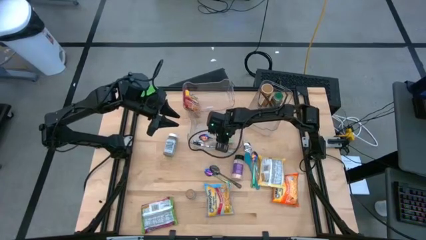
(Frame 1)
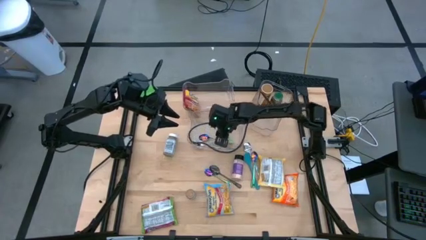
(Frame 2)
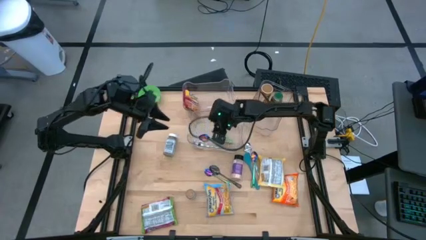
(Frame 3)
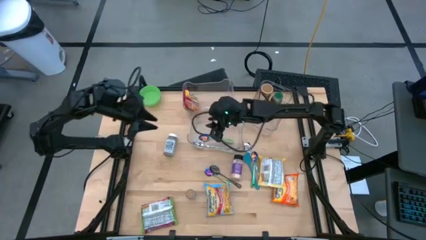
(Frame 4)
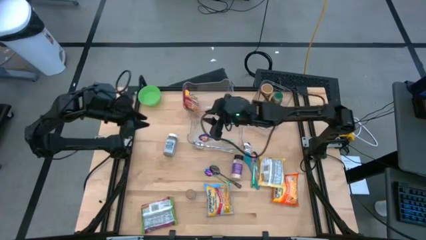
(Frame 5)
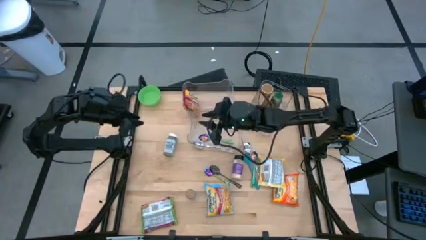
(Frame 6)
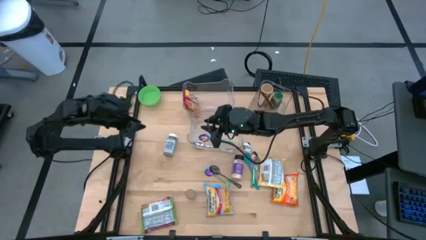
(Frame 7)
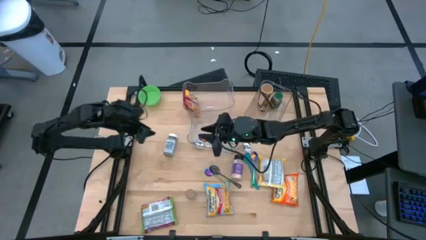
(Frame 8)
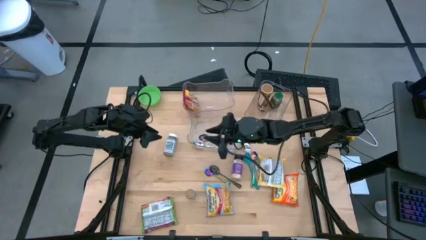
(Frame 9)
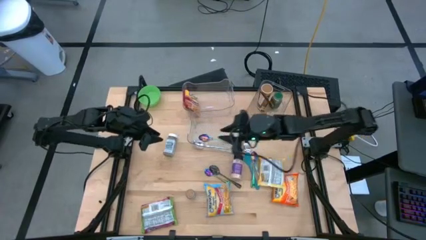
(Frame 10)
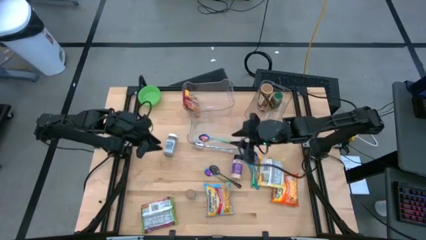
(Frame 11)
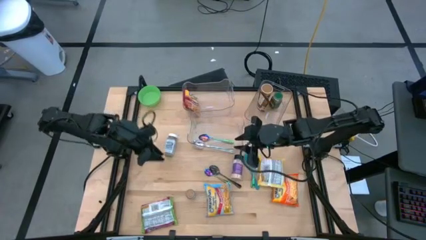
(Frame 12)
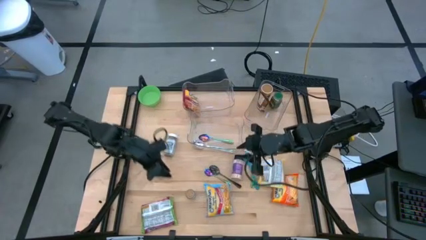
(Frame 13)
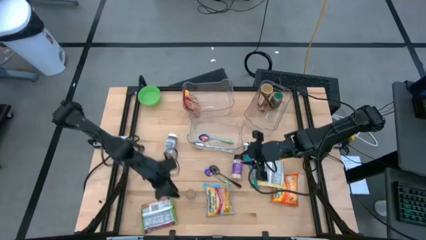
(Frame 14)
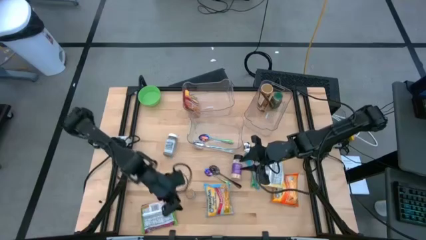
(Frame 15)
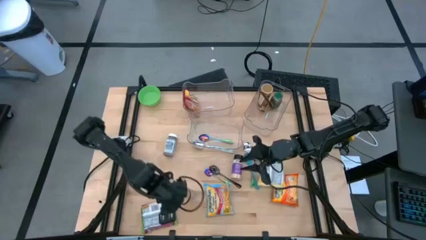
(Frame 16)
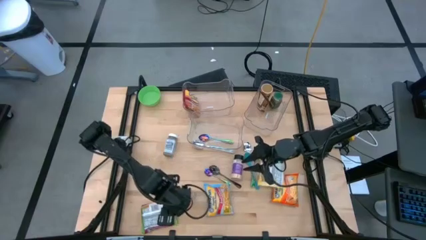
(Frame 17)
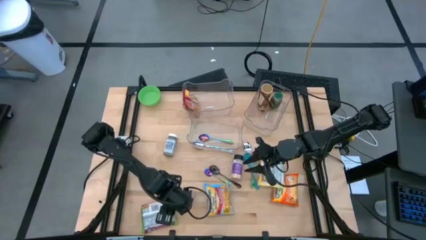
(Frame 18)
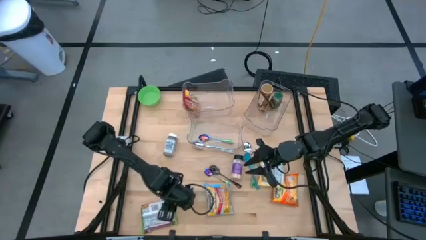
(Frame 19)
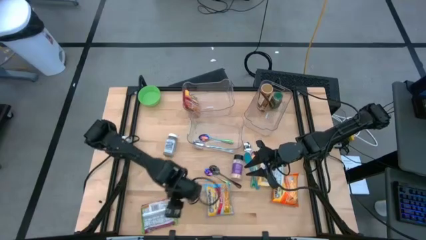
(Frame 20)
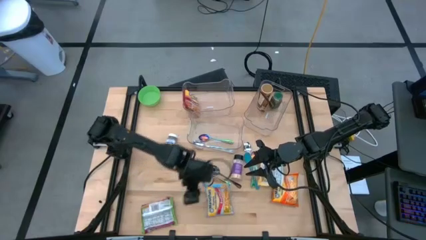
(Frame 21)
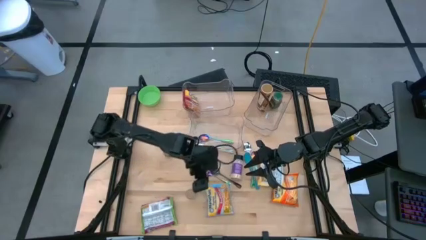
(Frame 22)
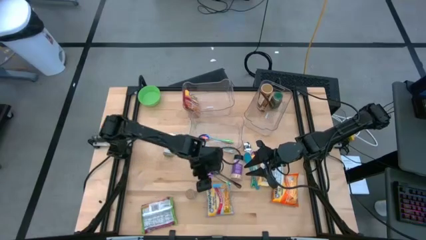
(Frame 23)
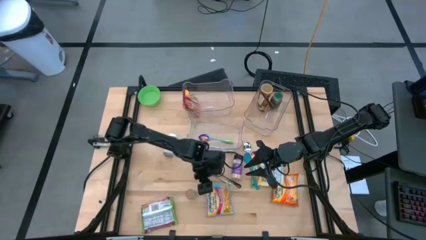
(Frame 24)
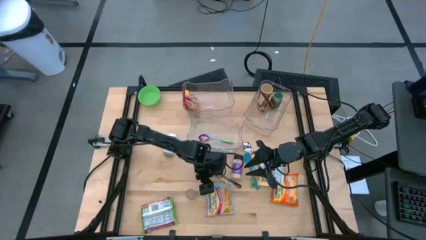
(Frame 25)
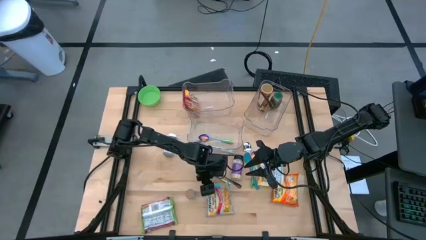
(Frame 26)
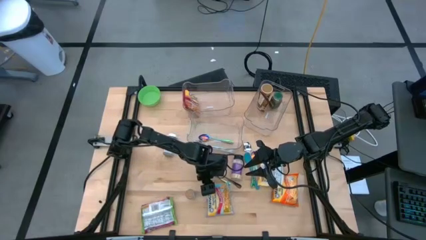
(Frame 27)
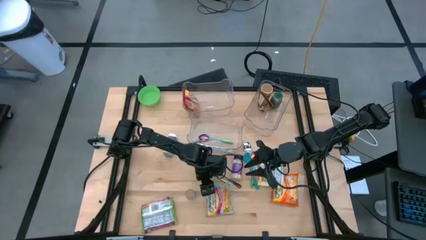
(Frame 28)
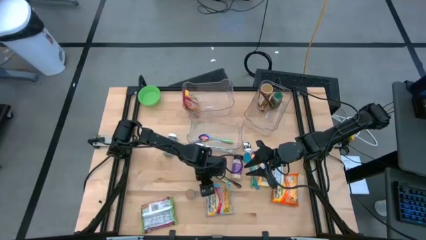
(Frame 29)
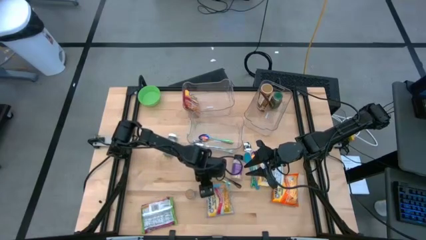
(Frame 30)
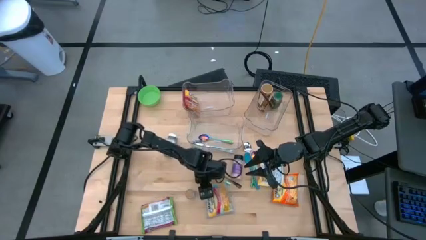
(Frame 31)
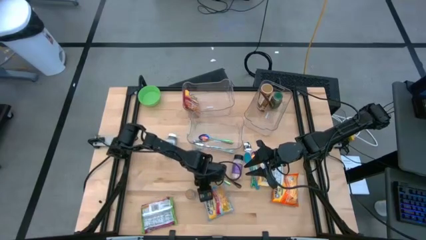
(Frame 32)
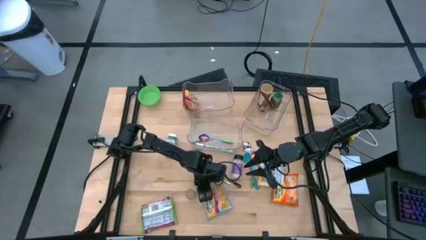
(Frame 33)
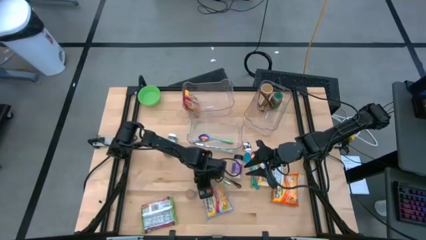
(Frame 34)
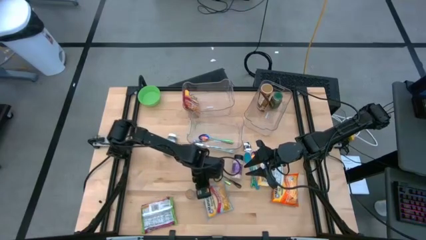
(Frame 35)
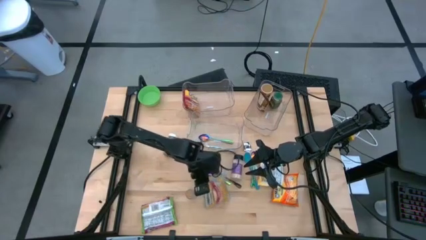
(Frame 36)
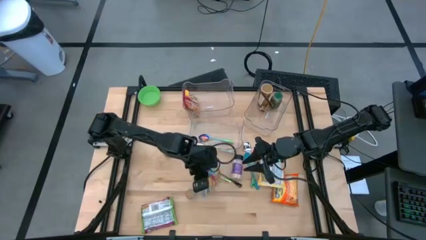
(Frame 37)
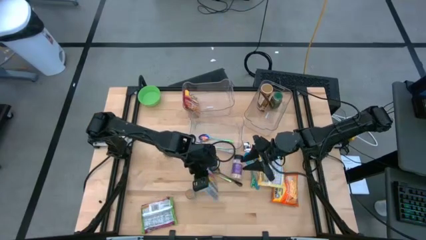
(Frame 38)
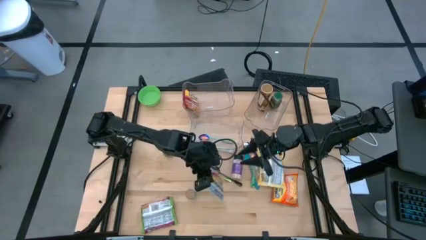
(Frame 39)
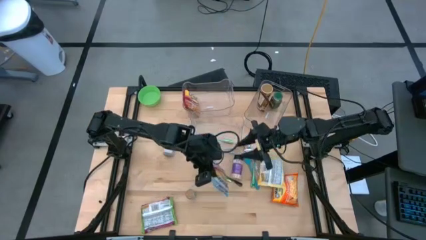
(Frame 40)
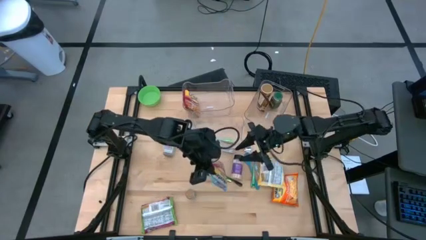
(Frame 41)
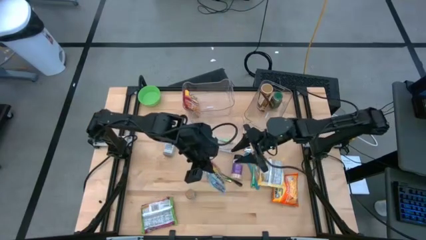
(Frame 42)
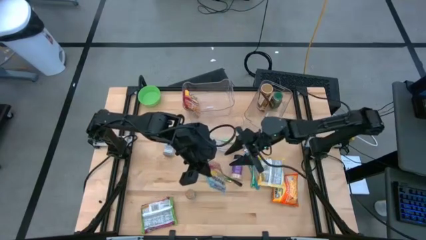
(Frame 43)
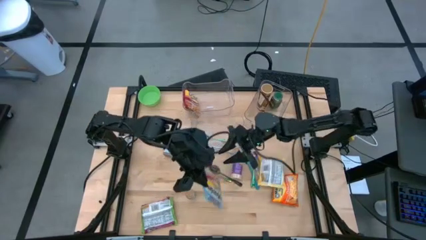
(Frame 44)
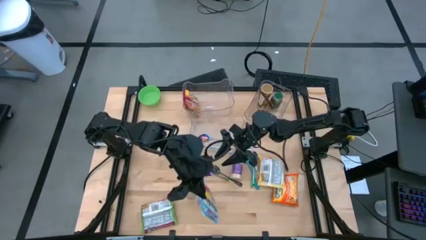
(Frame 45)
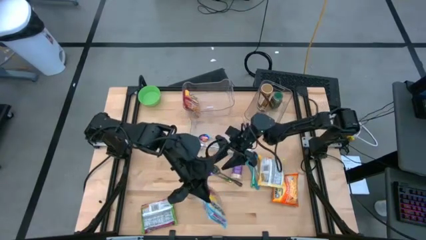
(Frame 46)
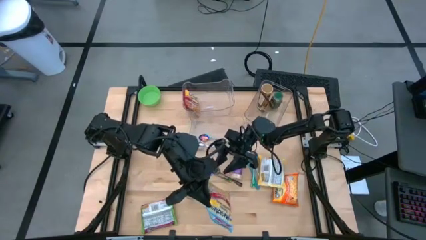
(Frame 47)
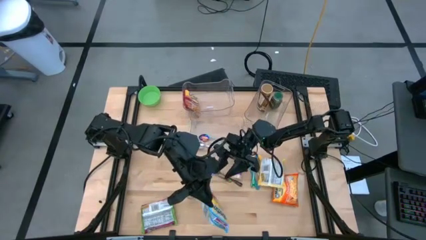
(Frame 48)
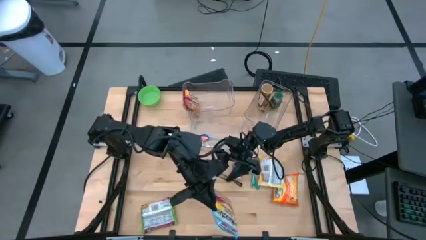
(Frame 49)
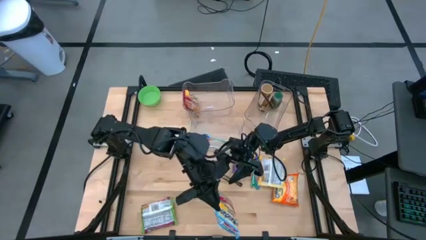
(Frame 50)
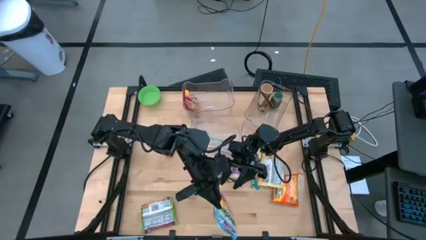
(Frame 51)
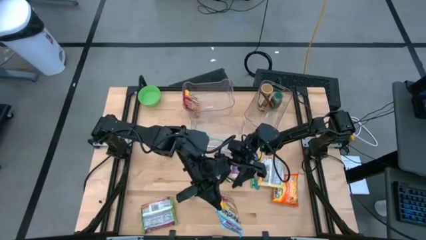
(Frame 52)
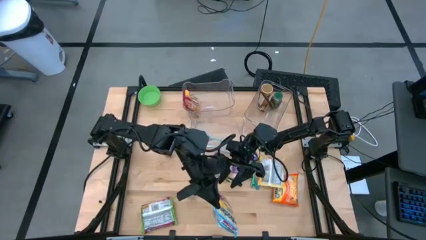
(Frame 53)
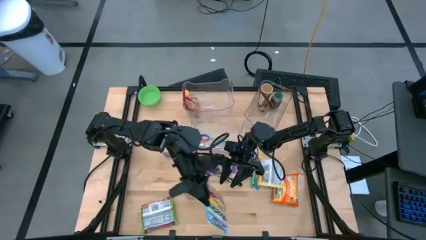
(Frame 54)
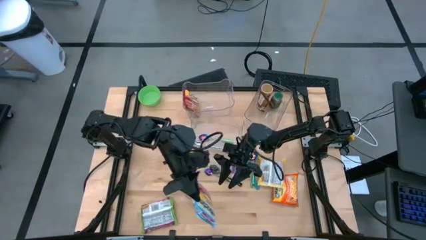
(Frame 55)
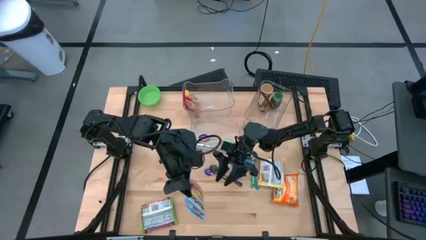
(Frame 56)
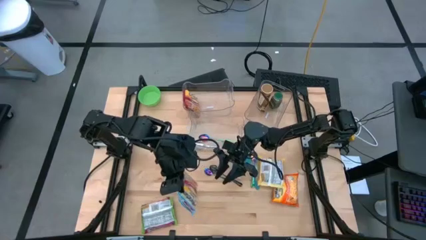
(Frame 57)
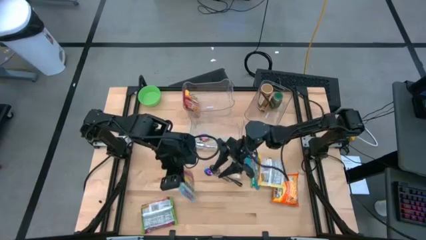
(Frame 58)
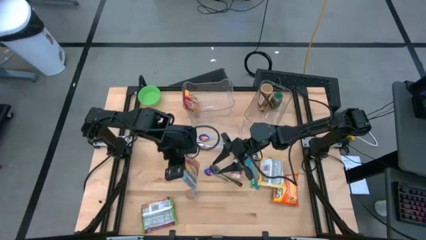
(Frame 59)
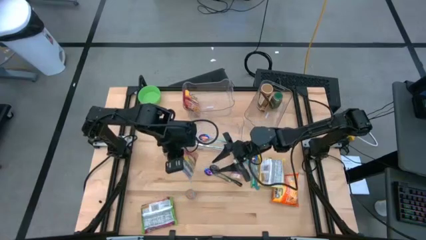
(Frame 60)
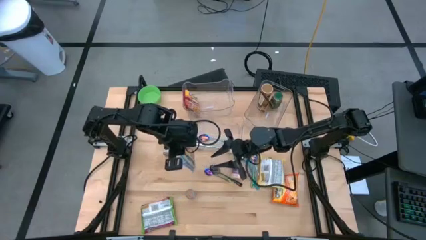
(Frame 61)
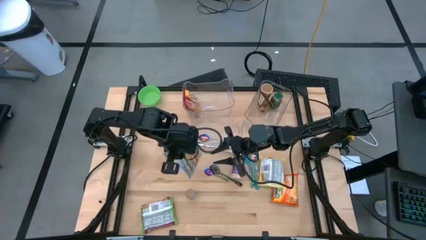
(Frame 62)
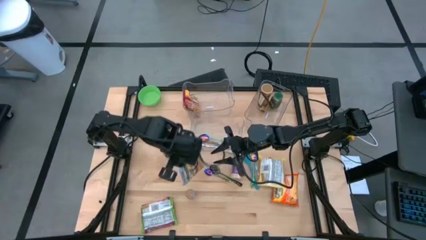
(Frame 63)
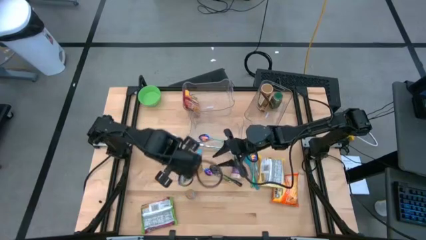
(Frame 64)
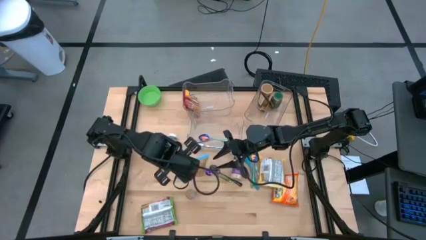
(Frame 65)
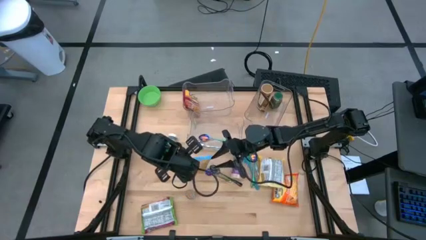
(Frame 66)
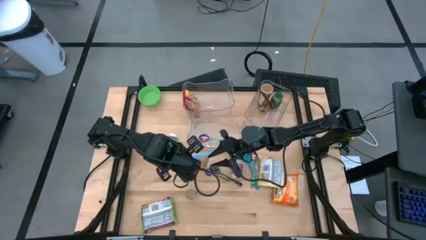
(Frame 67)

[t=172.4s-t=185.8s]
Task: Pick & Place Food Item
Put the blue noodle pack into the top left transparent bin
